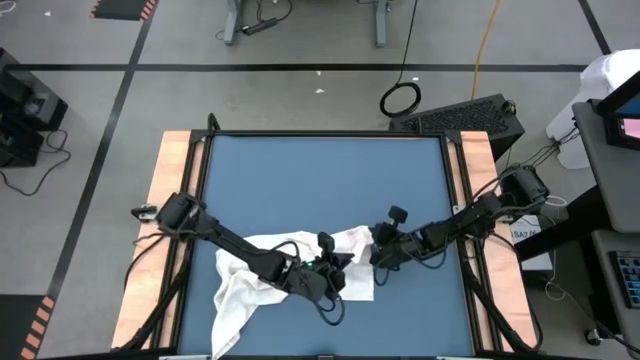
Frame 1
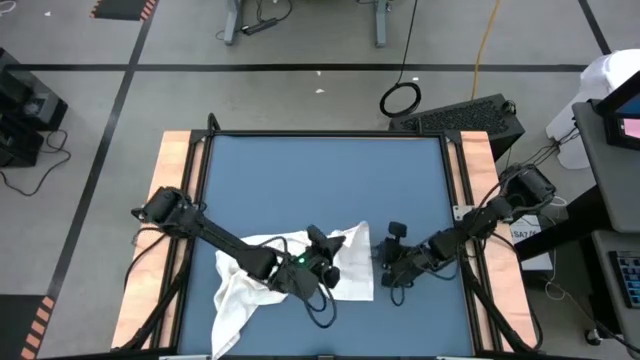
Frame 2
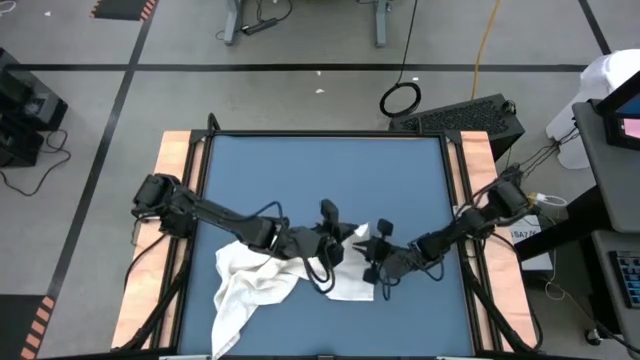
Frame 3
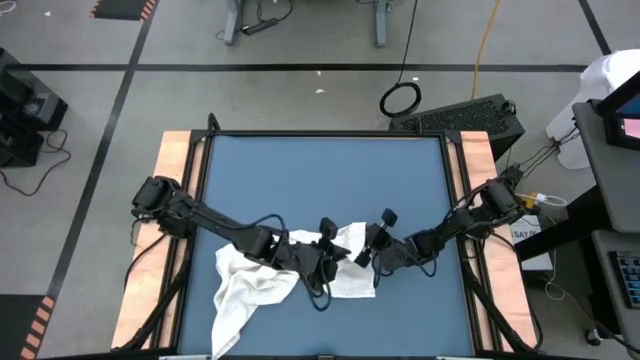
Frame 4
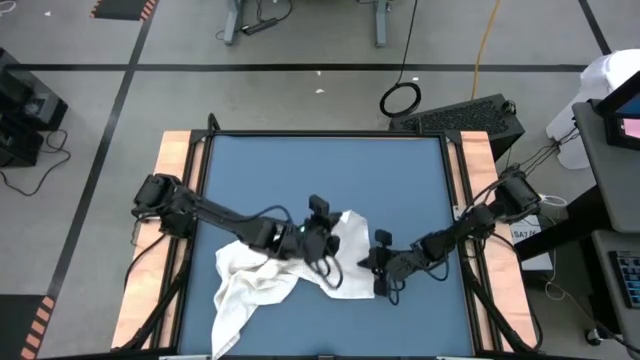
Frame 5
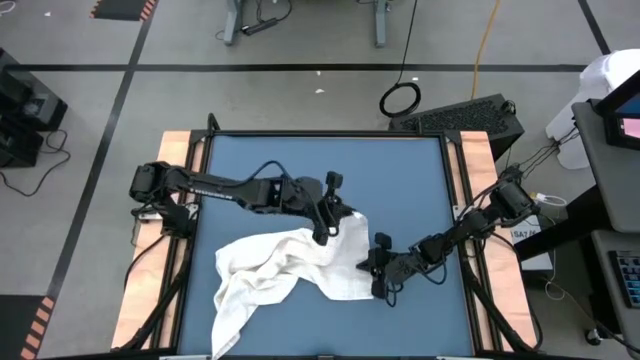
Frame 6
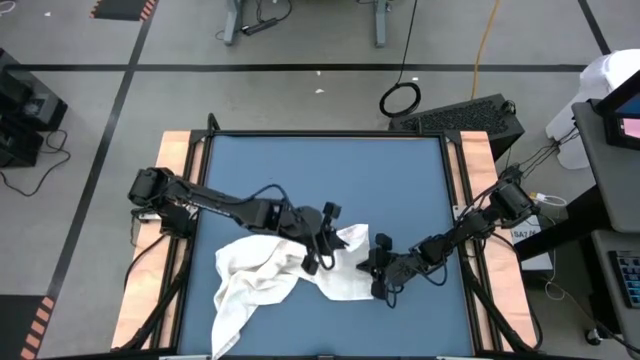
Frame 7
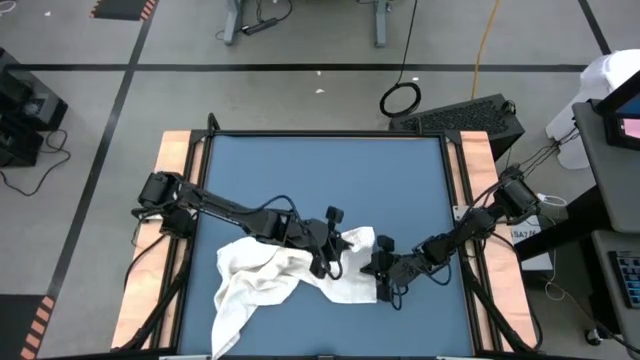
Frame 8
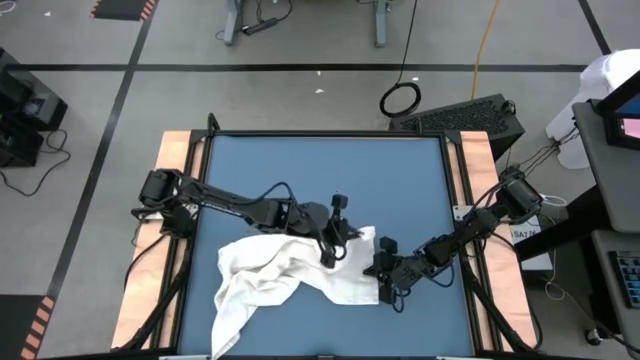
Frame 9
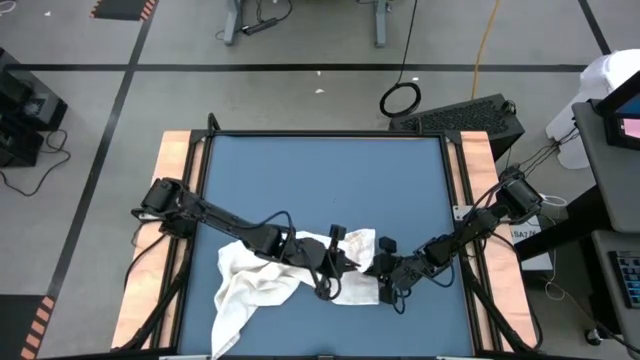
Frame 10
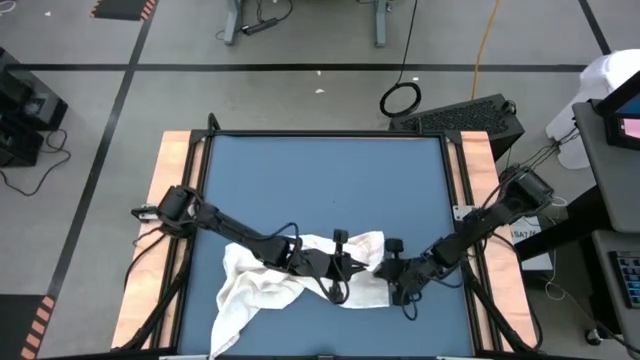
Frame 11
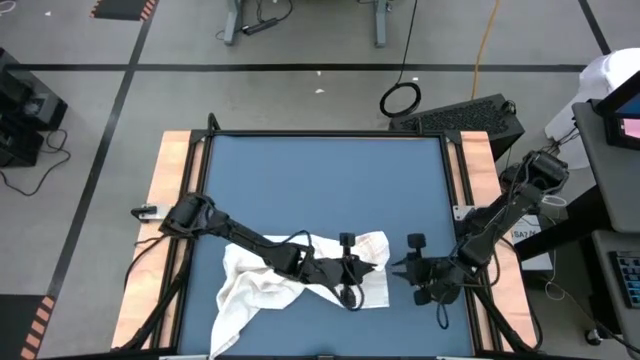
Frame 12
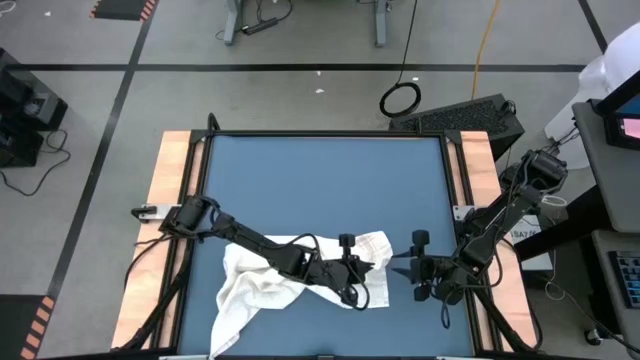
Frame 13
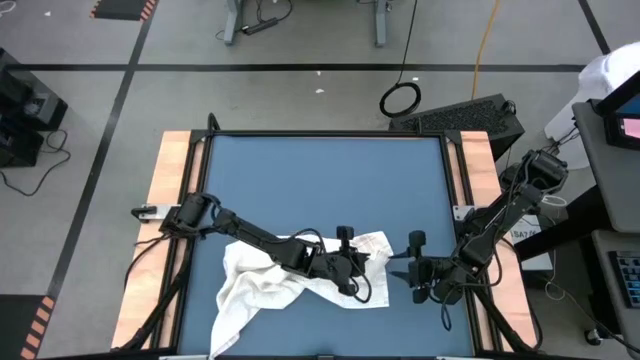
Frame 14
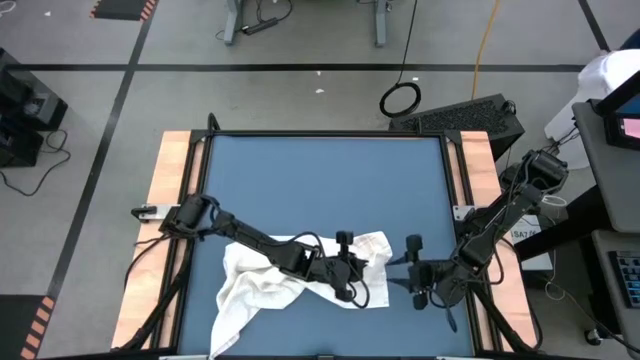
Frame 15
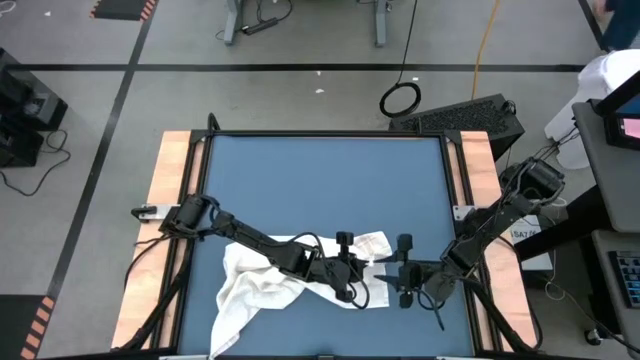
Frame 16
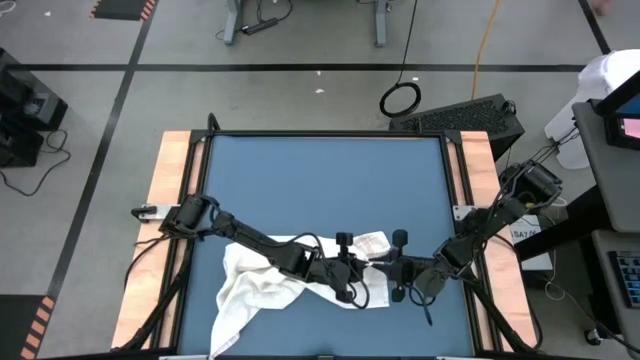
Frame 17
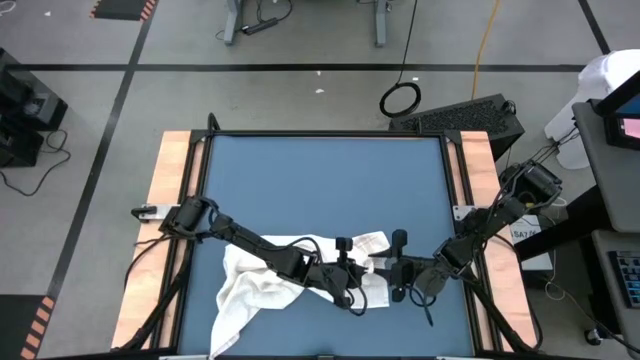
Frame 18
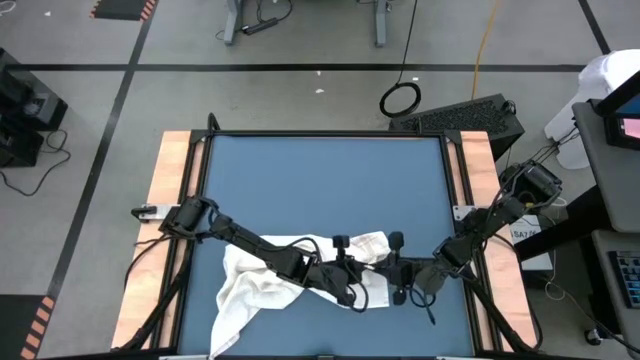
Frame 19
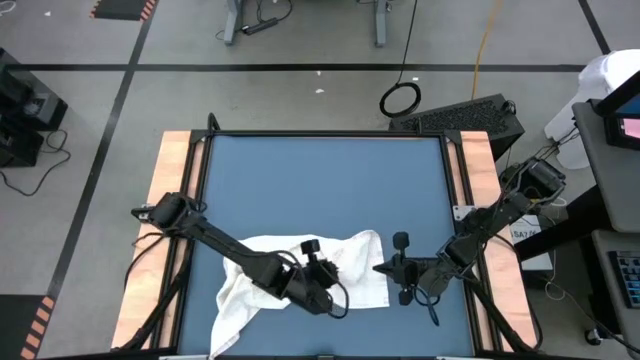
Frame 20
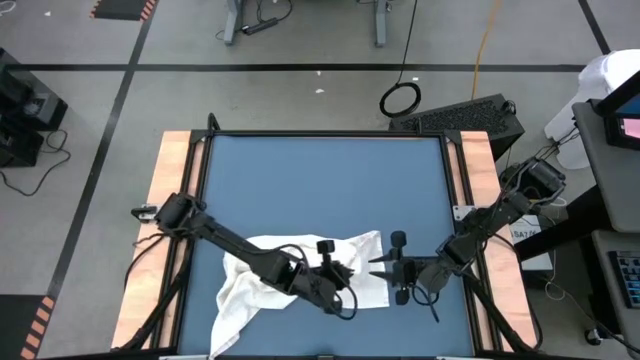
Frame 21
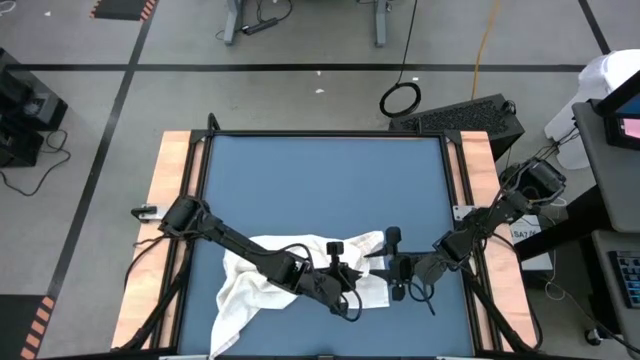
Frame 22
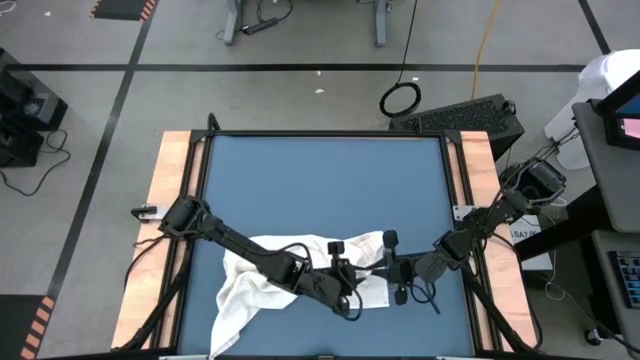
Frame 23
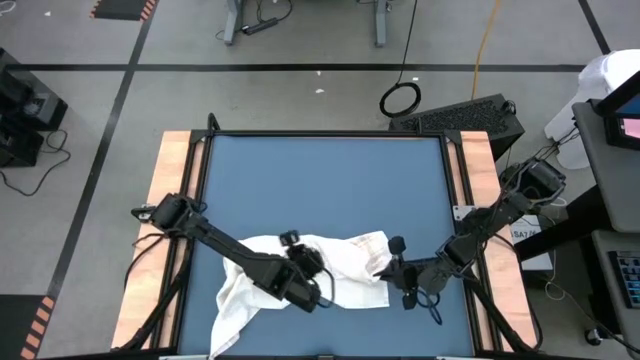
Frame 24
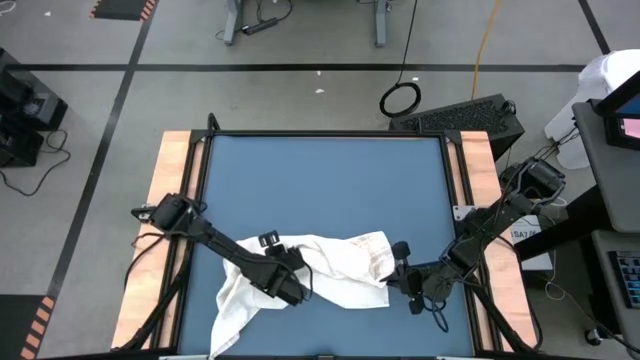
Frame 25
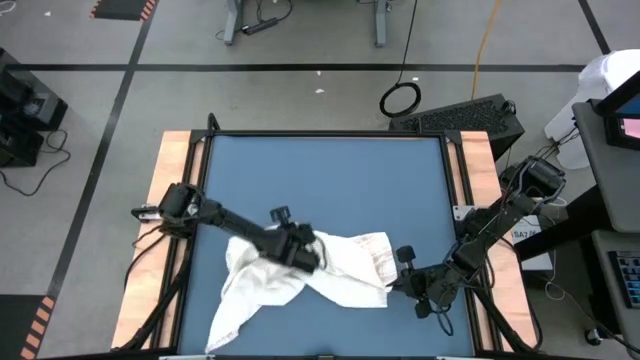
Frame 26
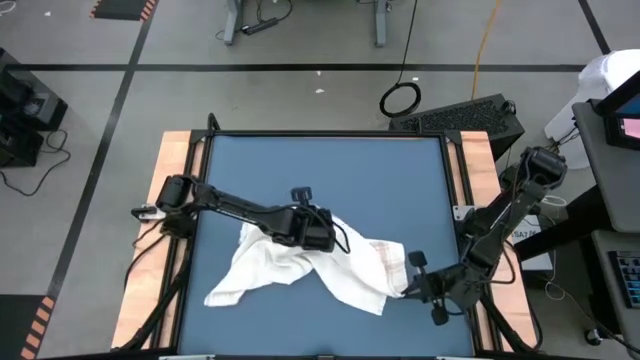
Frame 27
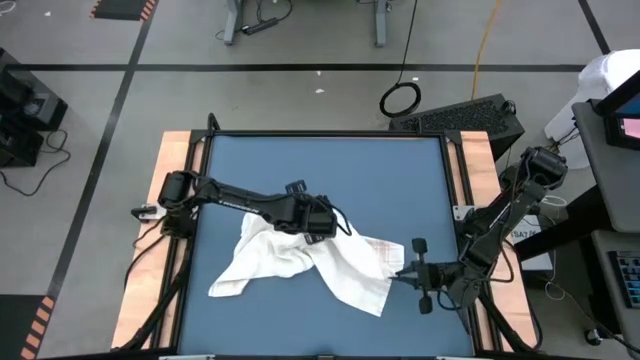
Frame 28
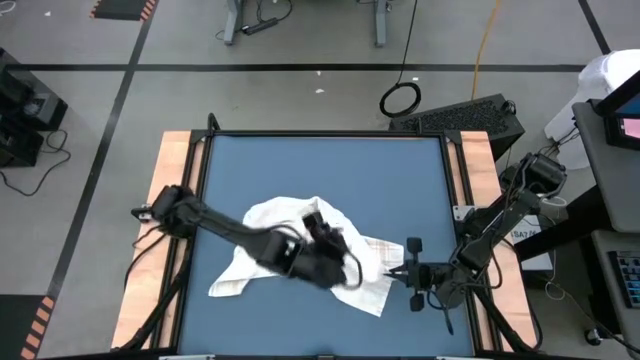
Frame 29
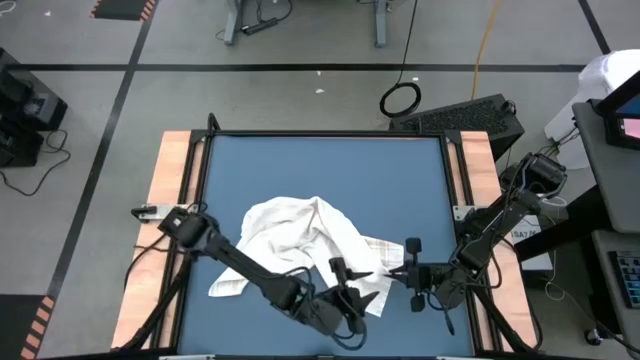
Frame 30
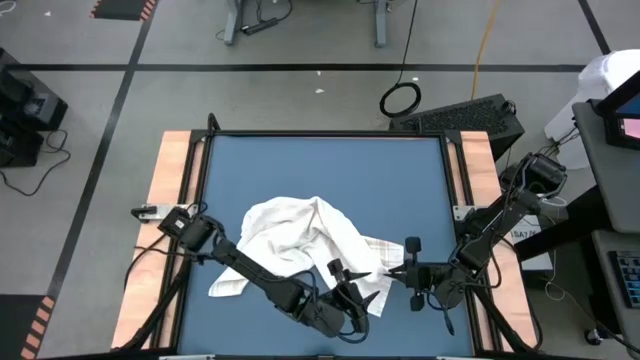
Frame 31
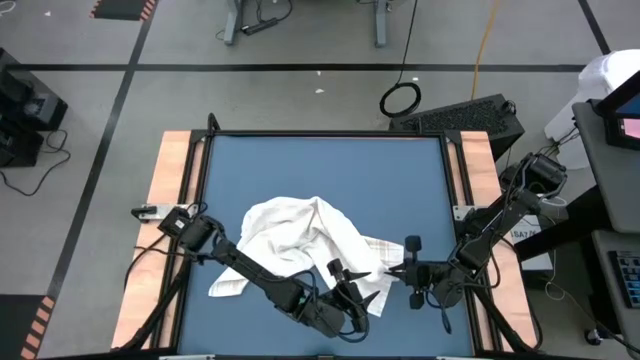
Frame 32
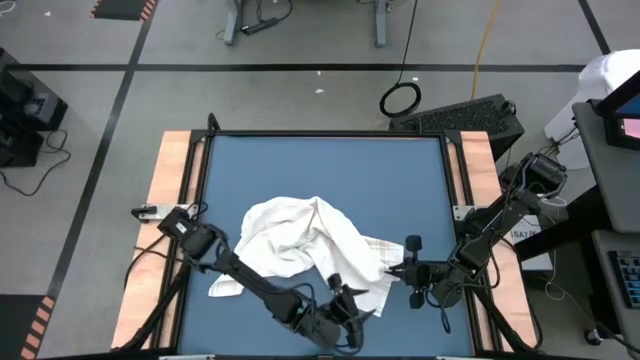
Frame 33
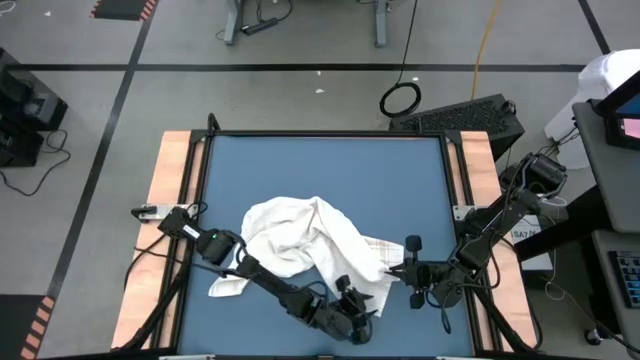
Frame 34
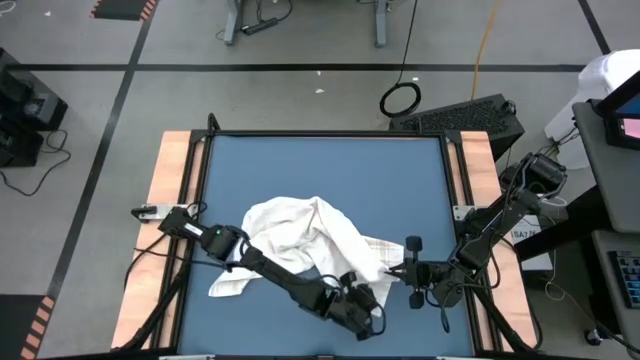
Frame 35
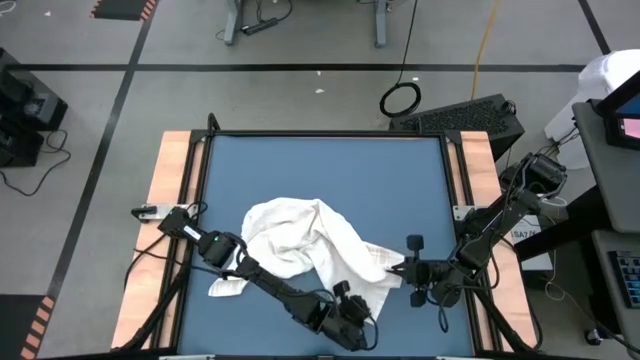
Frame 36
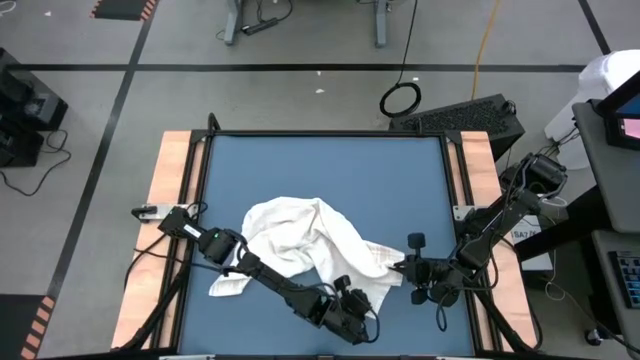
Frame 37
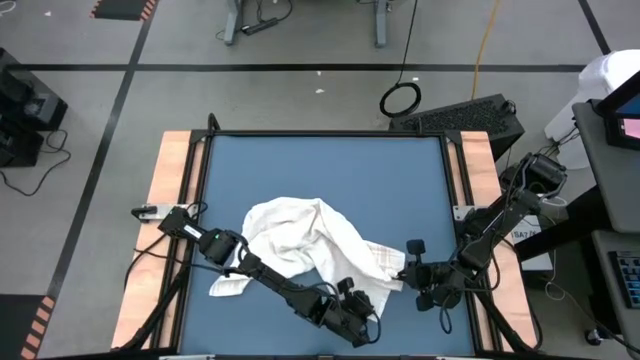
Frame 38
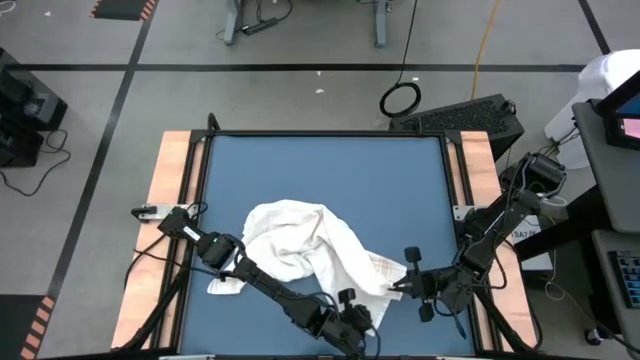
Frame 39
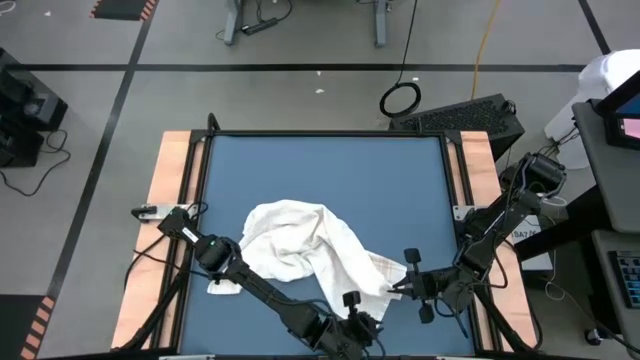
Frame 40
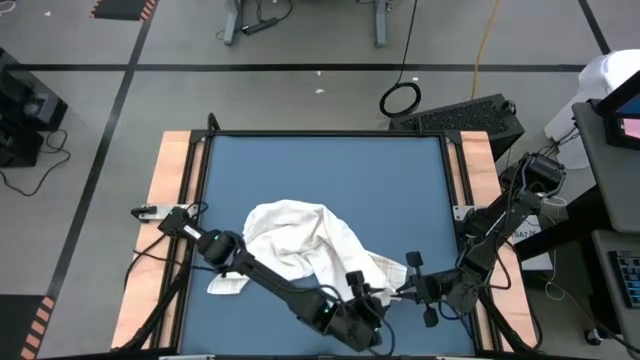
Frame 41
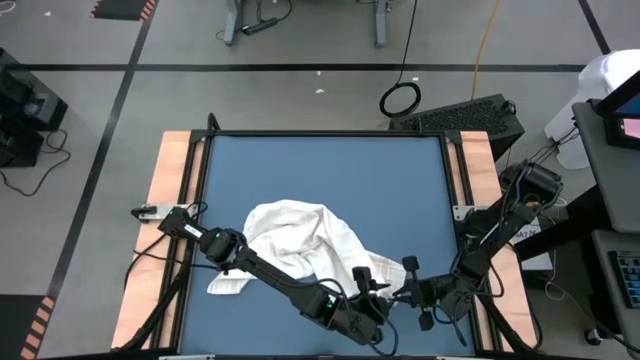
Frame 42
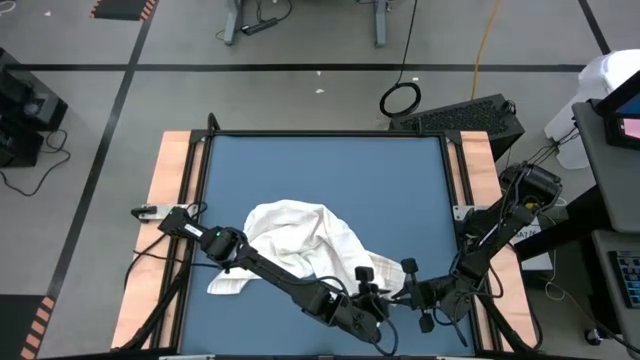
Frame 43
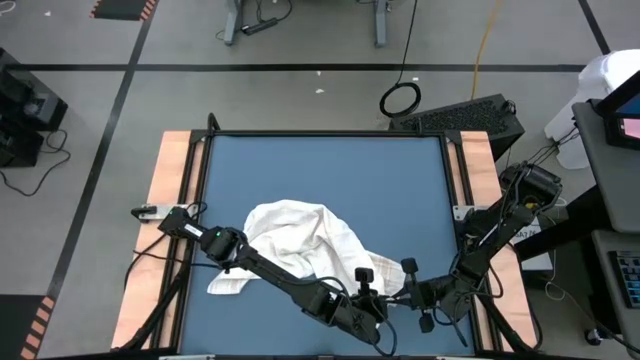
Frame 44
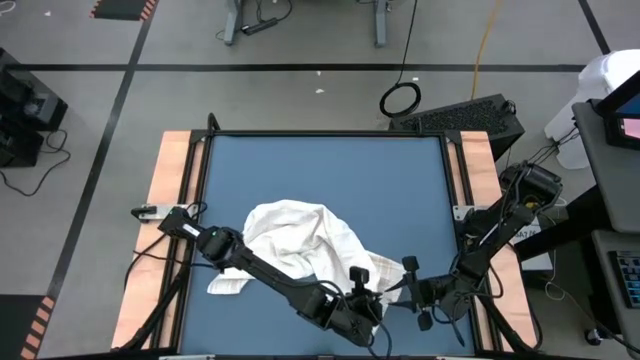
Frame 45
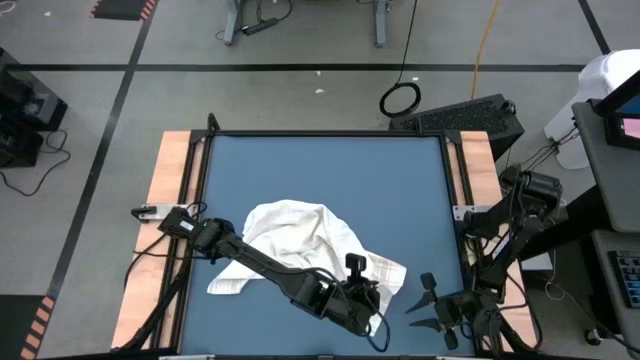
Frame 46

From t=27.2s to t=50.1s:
Task: Roll towel into tight, uniform cylinder
Roll the white towel
